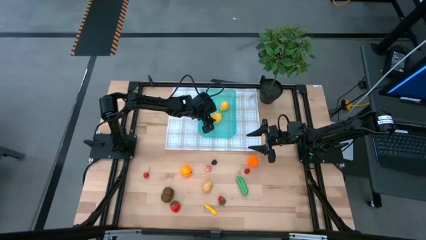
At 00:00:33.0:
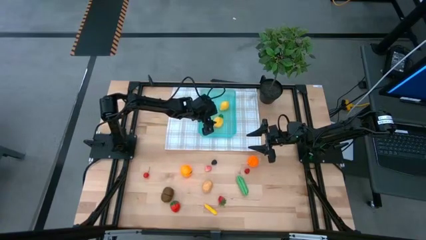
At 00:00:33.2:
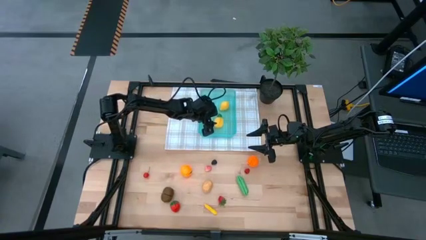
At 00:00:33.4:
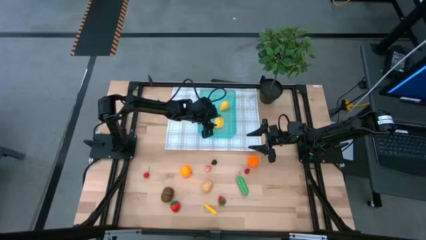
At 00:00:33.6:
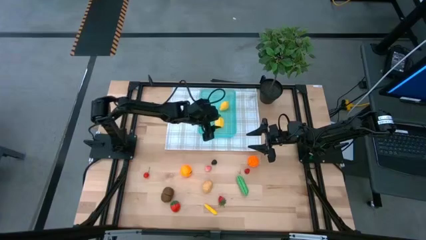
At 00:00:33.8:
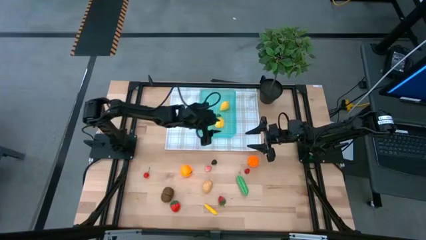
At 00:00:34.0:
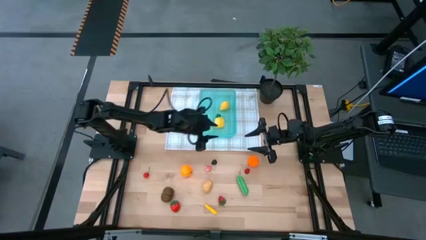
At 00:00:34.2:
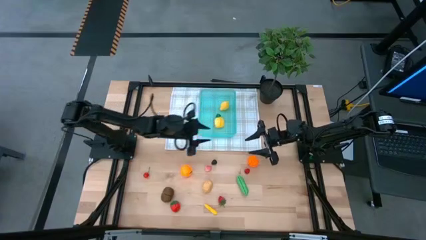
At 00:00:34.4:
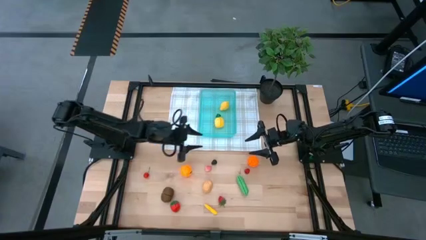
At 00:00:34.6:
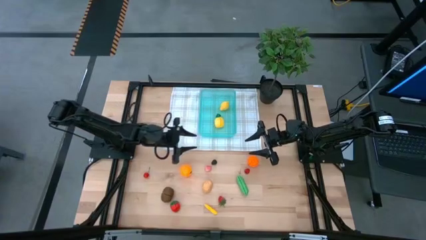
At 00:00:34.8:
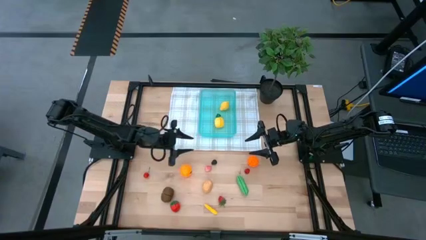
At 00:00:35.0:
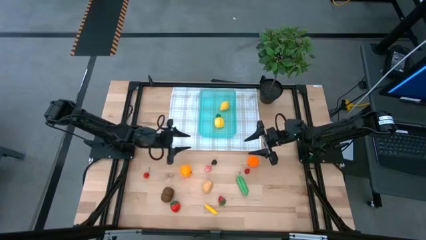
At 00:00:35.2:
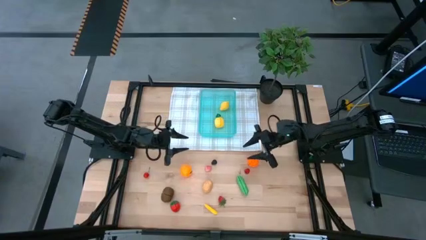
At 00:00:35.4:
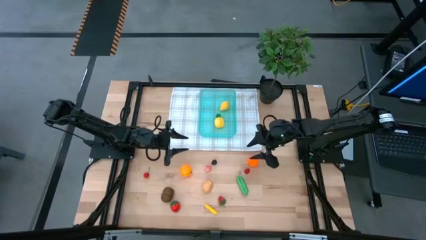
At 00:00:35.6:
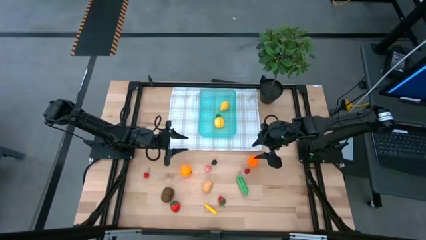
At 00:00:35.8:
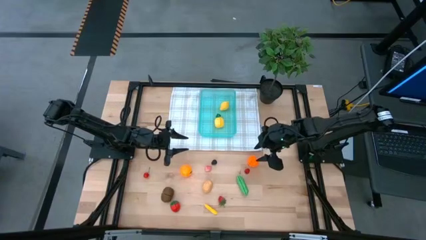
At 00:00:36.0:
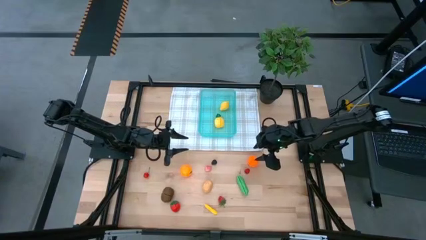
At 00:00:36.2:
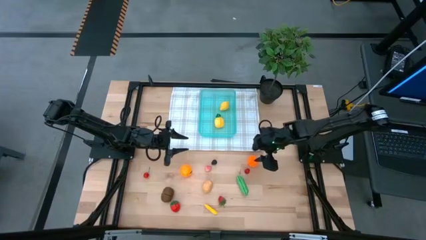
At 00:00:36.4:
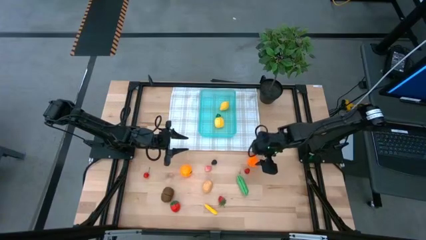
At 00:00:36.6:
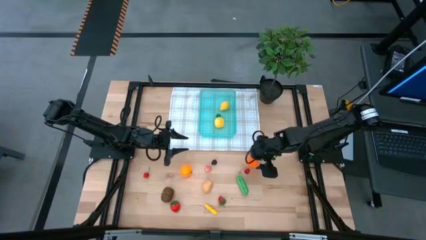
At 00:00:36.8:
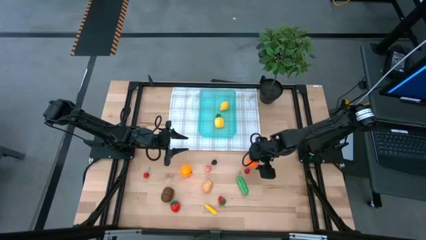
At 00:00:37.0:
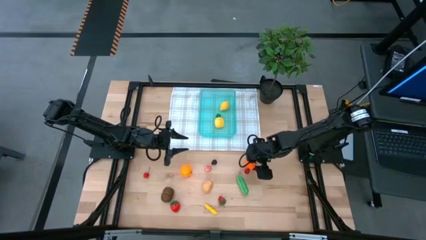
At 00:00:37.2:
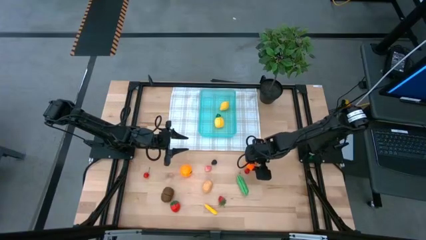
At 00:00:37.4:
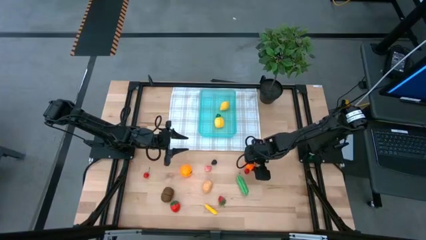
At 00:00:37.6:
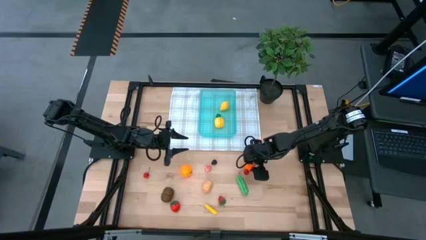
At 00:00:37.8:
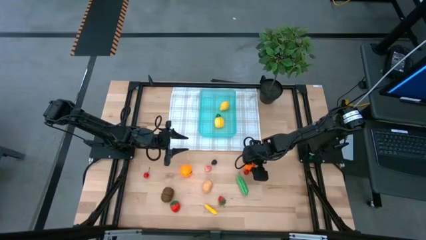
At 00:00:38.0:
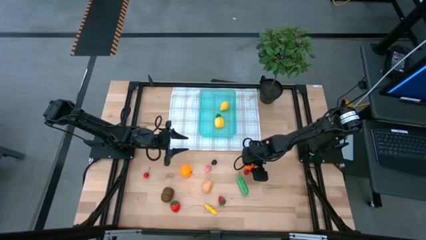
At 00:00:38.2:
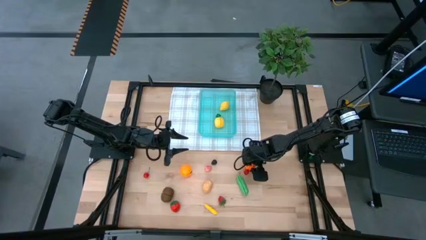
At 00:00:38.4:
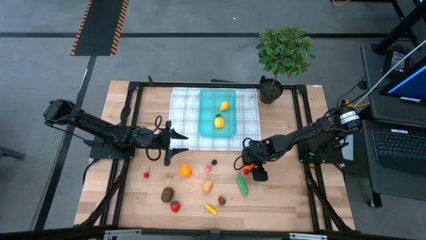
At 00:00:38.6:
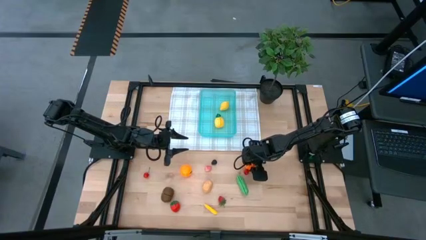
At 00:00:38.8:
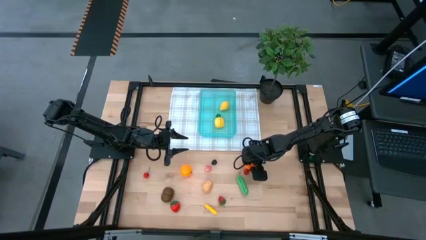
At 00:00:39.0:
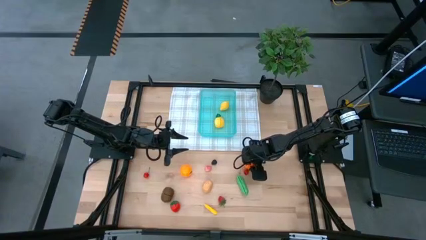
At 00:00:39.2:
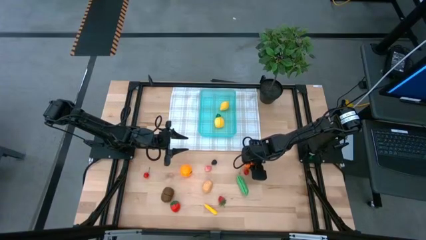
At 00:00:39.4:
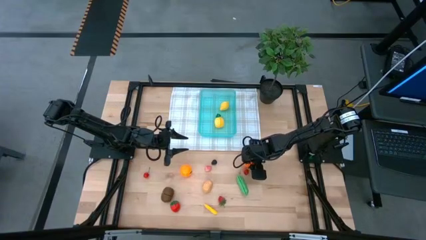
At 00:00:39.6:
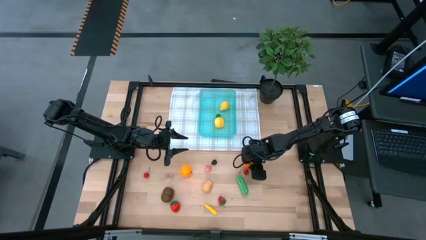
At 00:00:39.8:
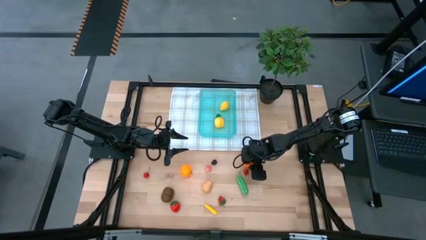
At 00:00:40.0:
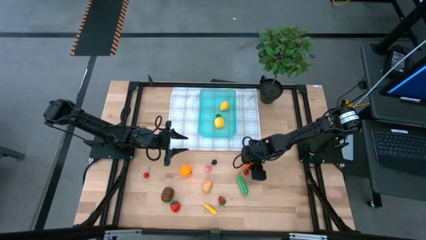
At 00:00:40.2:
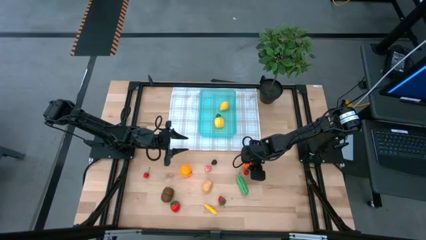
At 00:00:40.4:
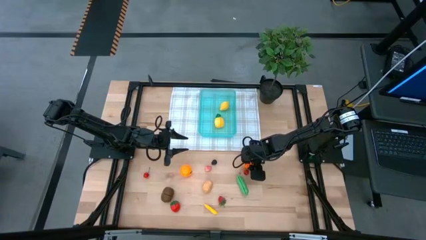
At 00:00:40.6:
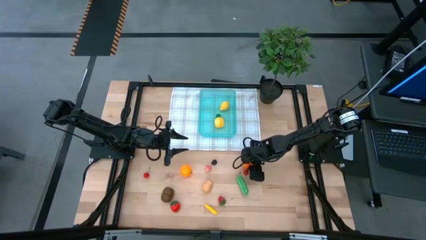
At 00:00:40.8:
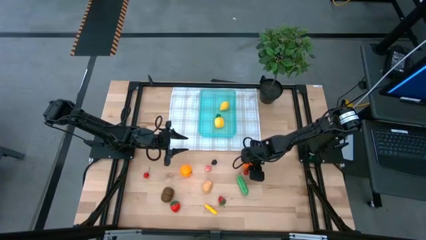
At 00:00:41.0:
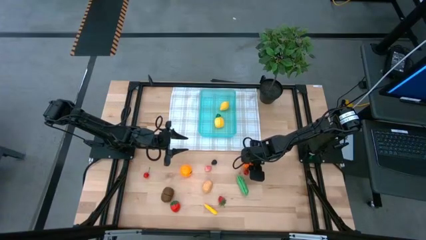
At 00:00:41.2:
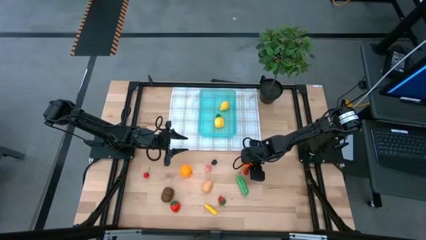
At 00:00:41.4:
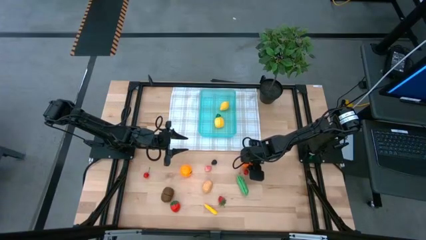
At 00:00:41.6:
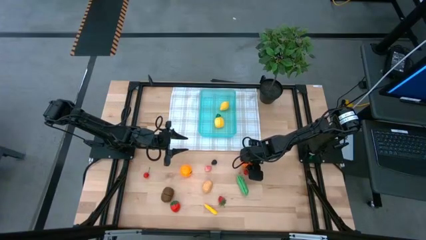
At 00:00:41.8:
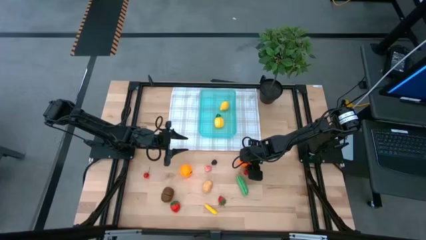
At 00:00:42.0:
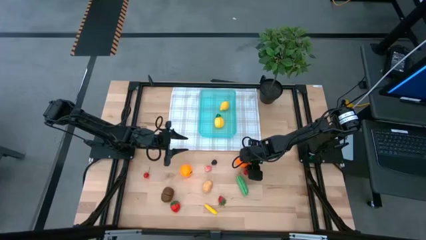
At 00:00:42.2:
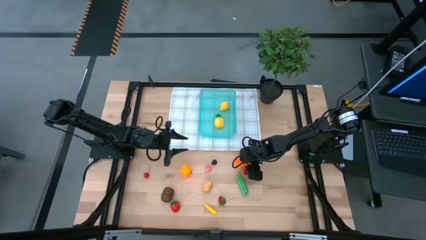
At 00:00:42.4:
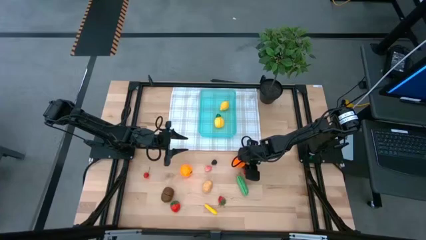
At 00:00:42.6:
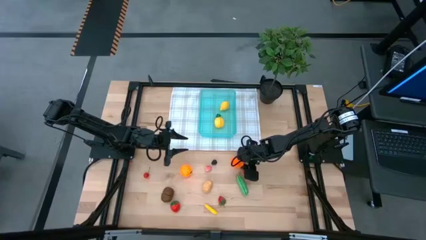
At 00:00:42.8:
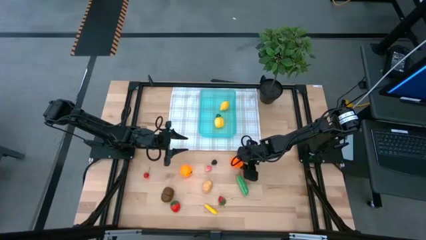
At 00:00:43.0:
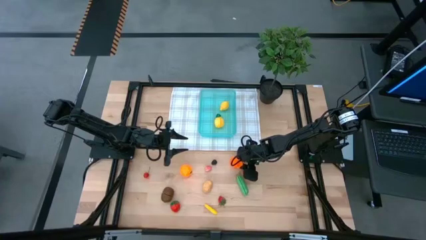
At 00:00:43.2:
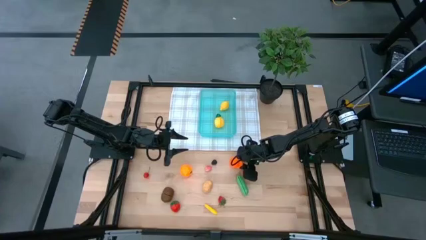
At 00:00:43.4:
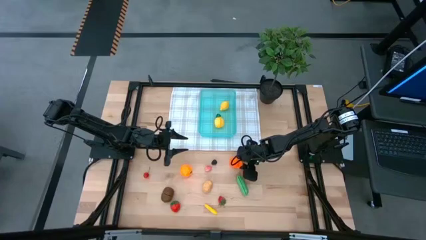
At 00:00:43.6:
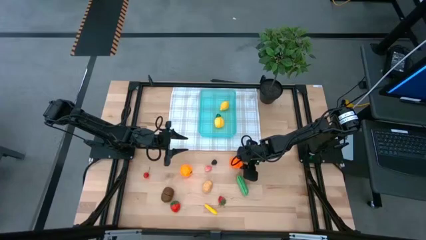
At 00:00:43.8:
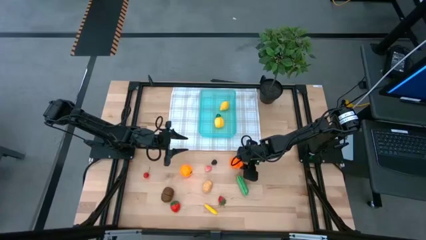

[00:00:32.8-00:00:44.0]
Task: Pick and placing Produce into tupperware
Put the orange pumpkin into the green bin

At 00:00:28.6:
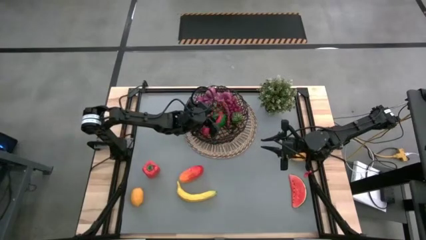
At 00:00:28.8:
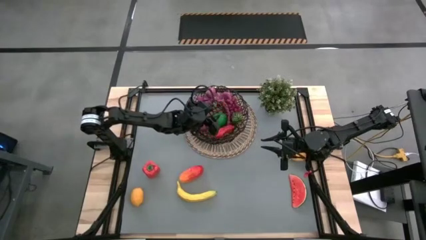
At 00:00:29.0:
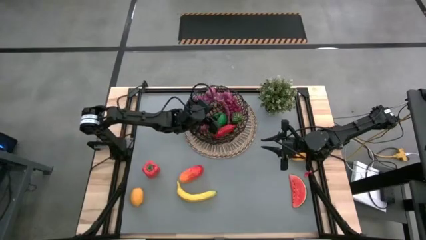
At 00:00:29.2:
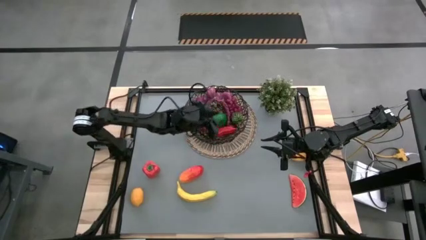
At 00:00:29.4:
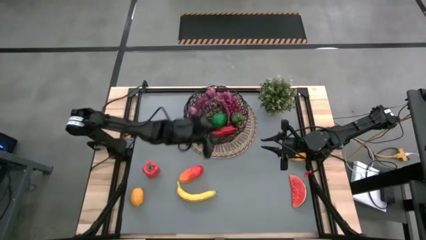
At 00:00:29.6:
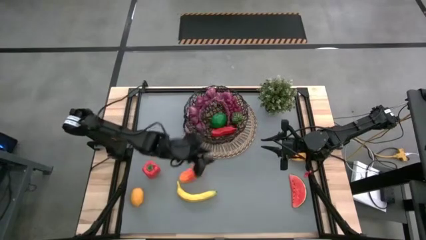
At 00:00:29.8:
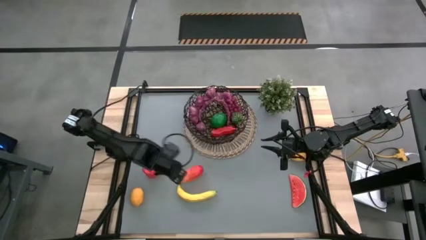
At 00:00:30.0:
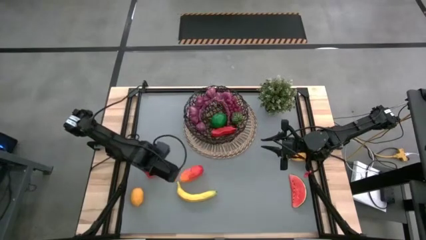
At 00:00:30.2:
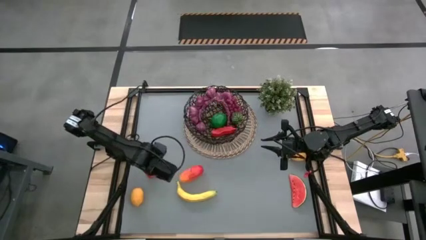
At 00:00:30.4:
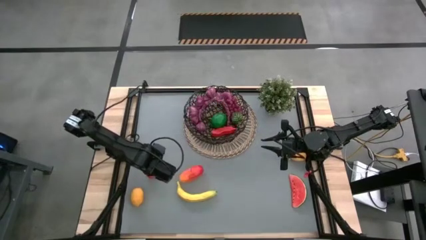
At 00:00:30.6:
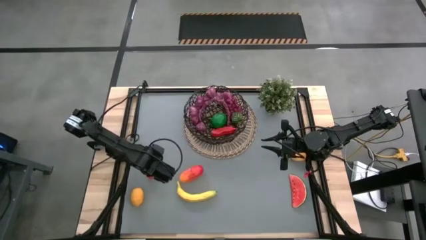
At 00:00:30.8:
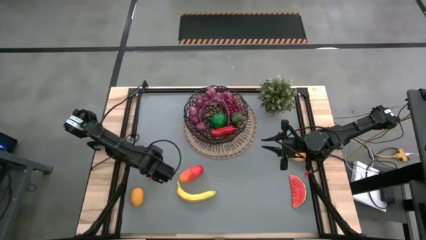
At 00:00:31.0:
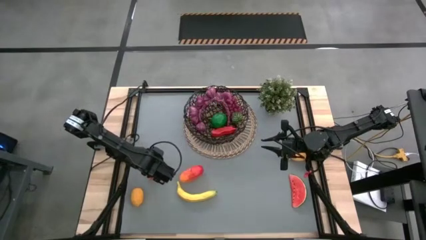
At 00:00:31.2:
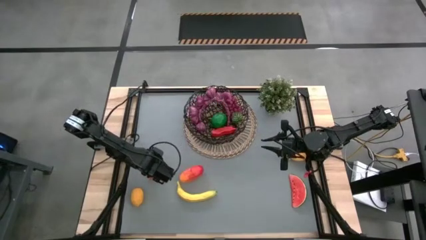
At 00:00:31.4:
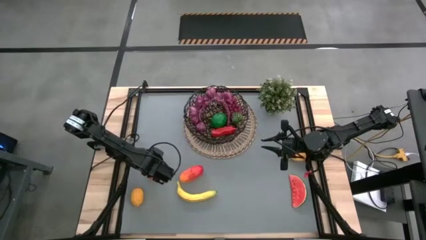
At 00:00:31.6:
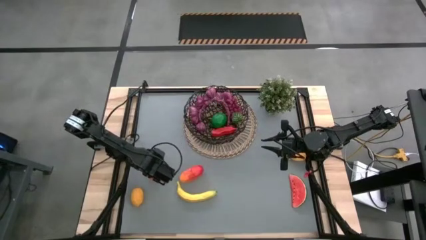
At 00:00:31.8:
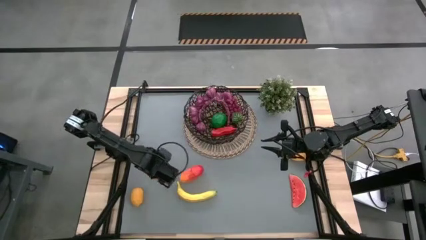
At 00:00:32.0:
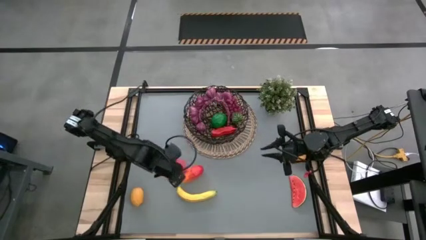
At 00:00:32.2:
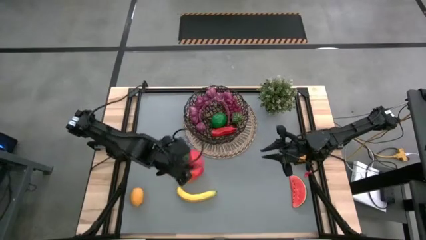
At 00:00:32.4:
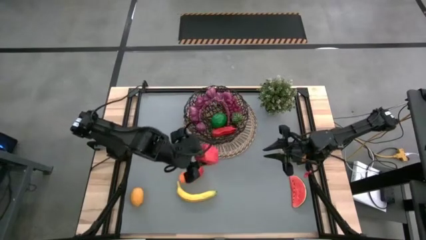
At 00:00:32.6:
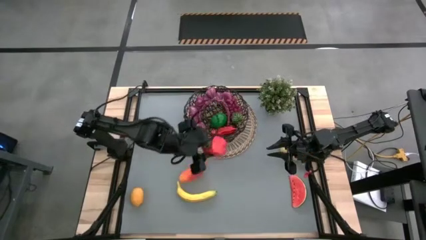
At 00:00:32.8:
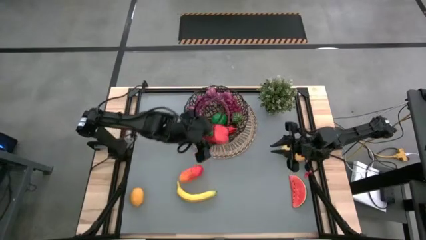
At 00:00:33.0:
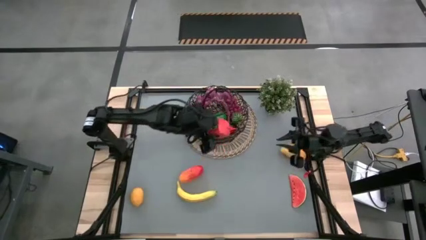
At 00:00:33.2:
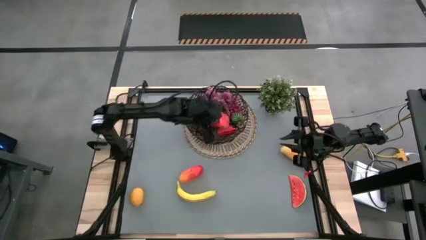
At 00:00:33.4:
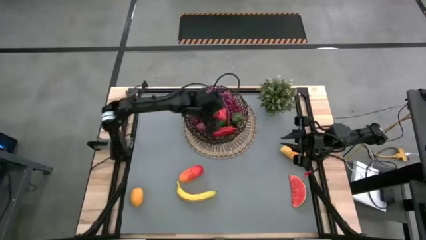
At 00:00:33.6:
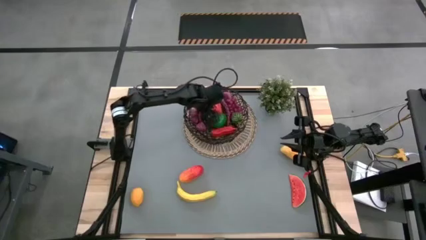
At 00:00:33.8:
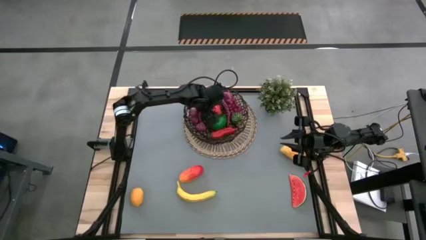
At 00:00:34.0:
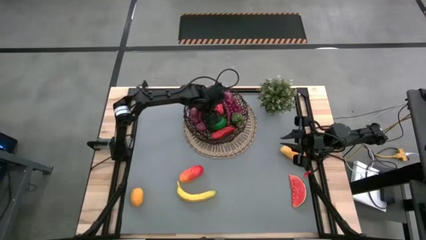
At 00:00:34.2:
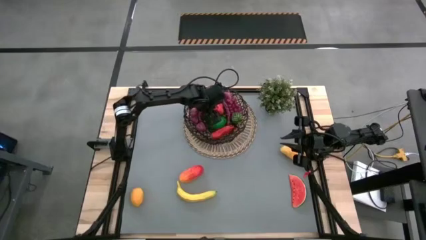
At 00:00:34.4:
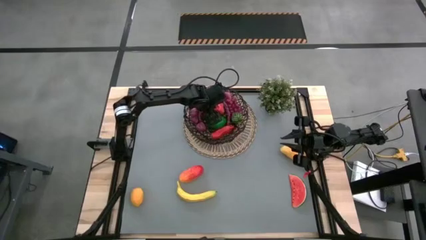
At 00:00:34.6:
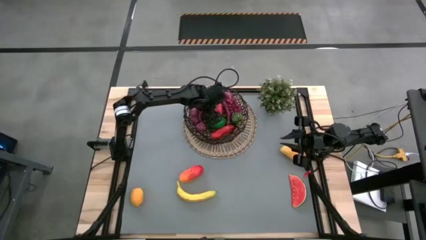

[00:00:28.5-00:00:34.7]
Task: Build produce basket
Put the red bell pepper into the basket
